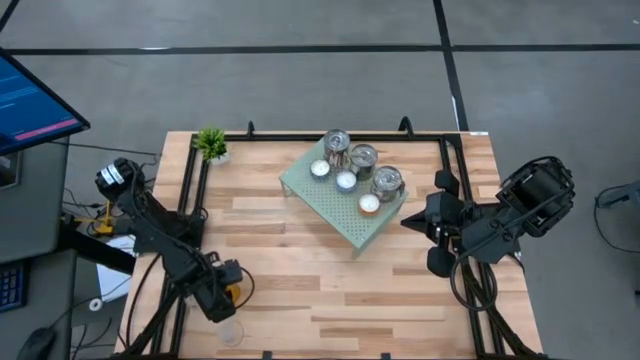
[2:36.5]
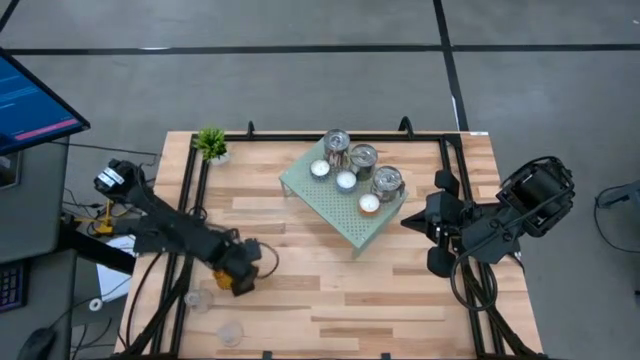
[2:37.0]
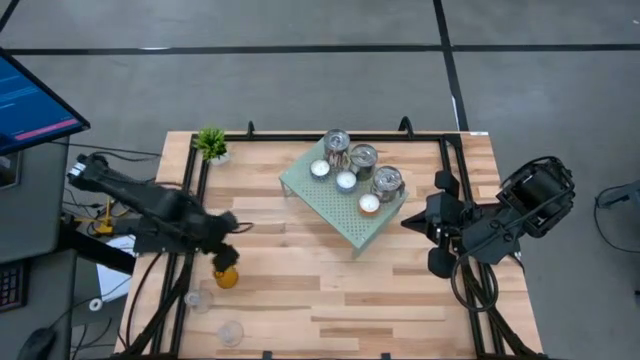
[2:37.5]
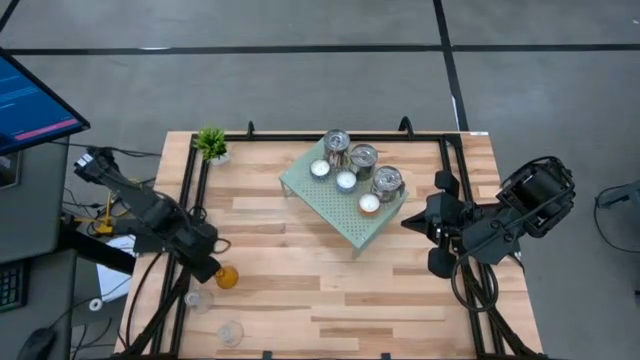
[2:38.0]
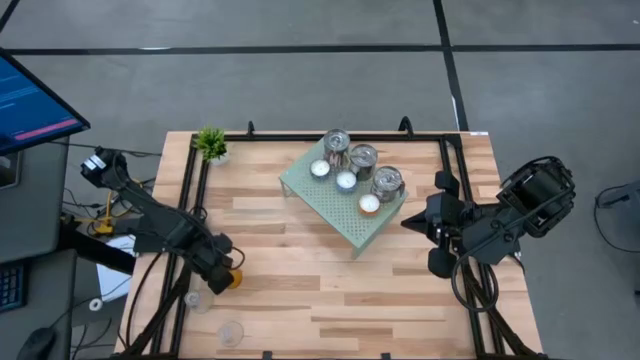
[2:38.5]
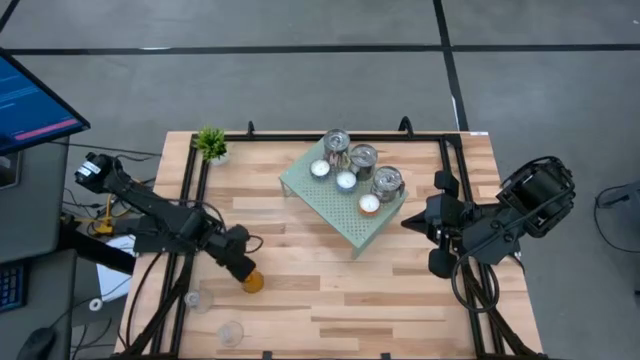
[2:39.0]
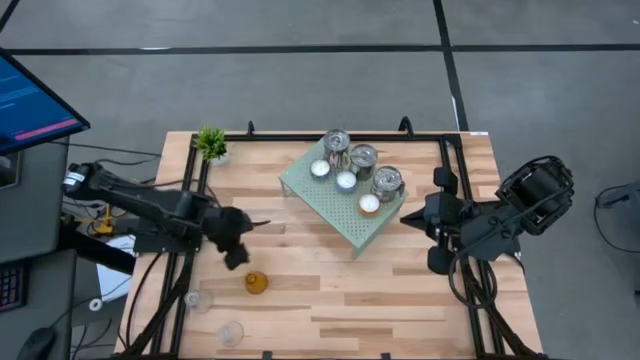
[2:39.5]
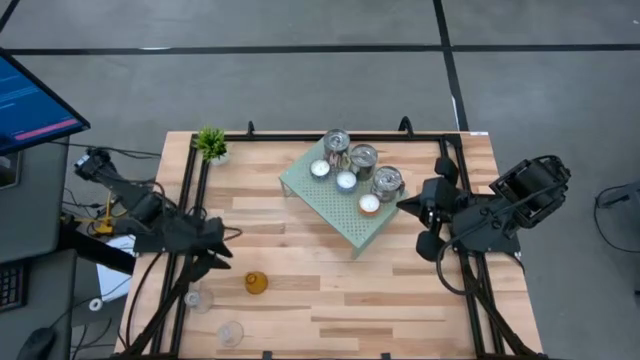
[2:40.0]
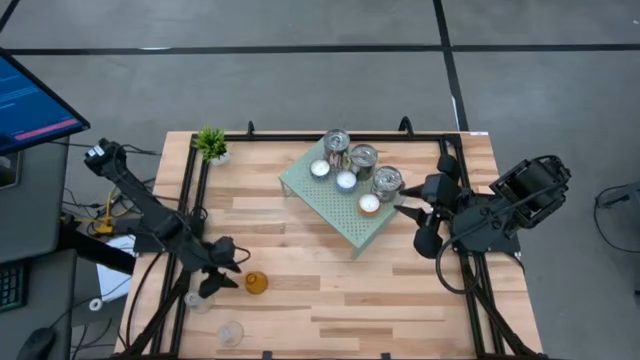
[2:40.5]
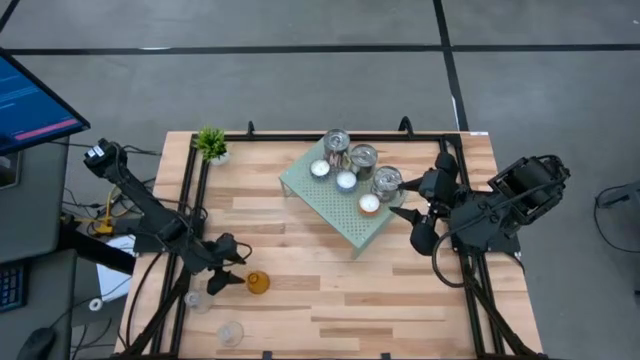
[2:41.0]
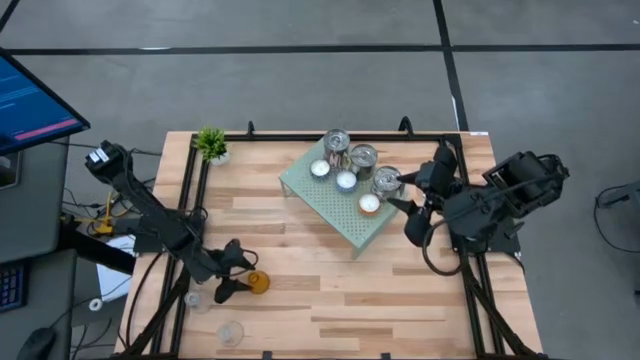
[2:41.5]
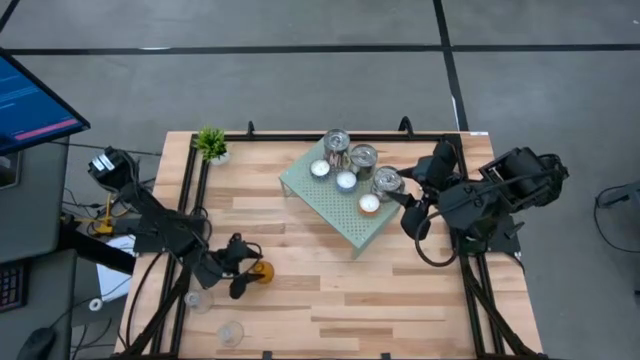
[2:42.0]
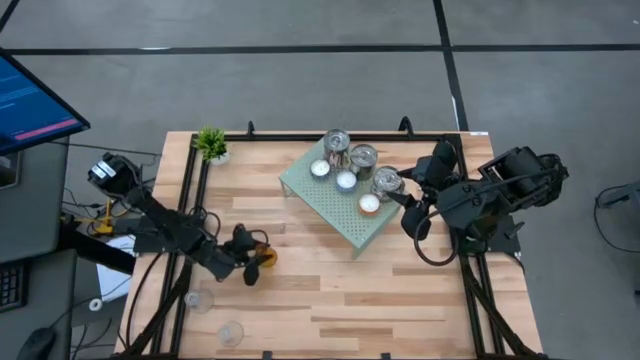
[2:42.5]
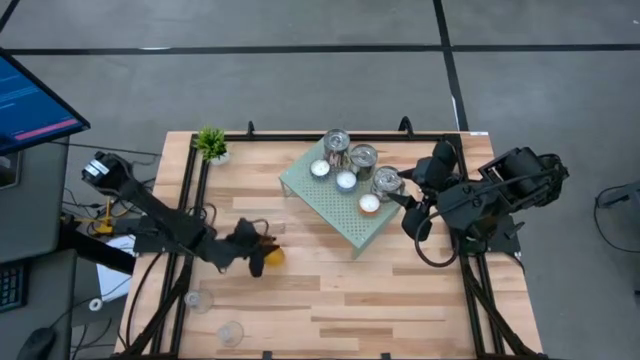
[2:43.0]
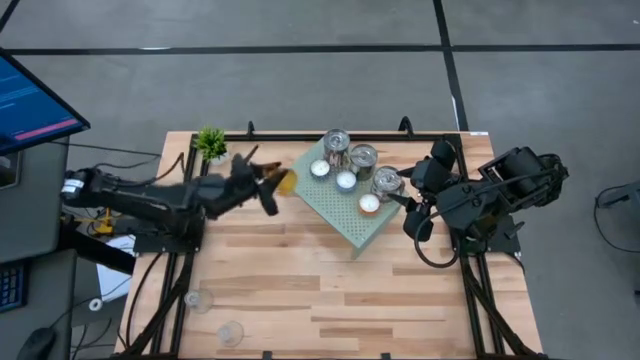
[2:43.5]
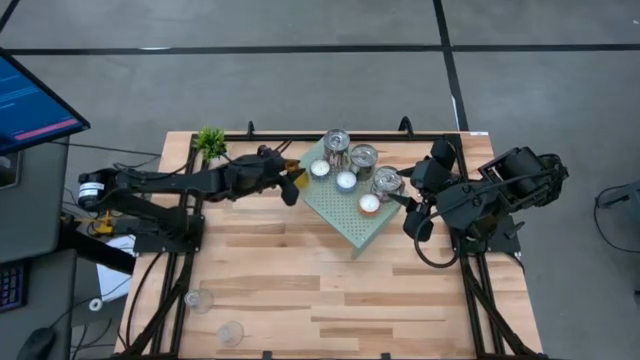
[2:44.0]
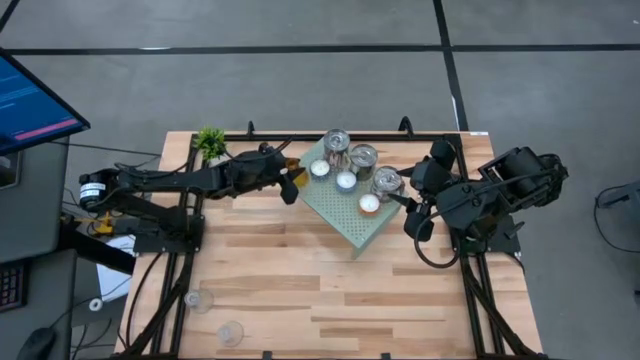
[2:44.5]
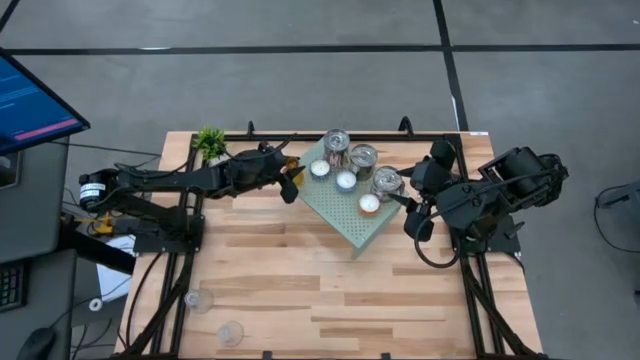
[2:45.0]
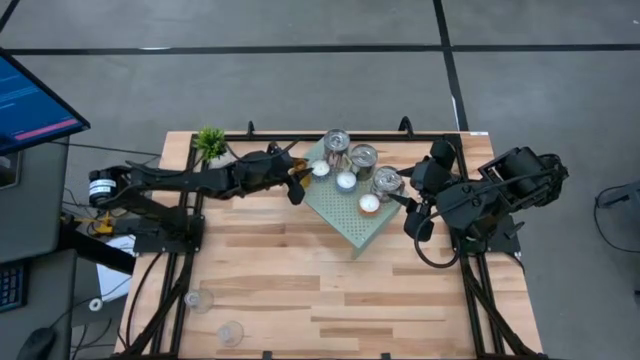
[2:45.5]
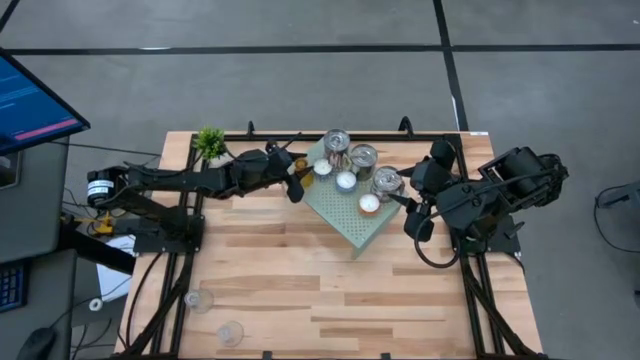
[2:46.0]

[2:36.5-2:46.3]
Task: Stock candles on shelf
Put the center orange candle holder on the shelf

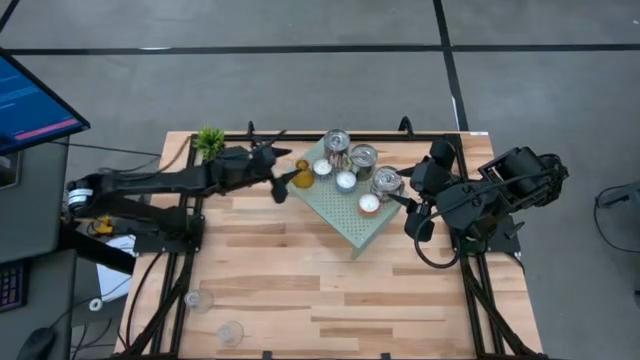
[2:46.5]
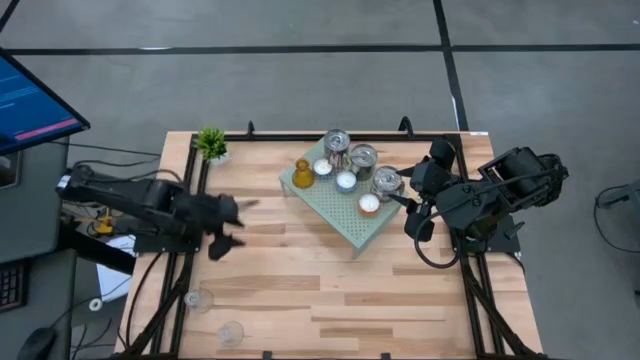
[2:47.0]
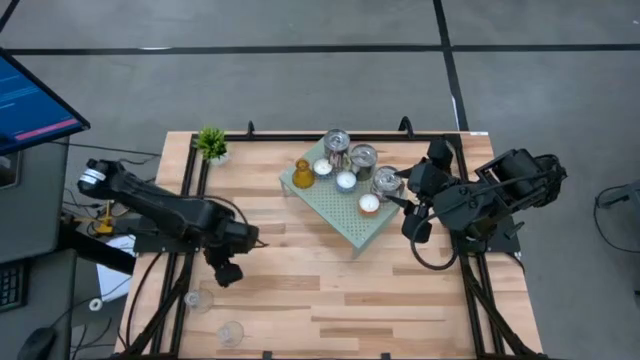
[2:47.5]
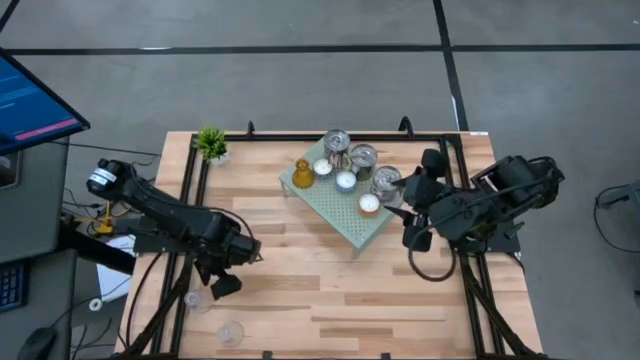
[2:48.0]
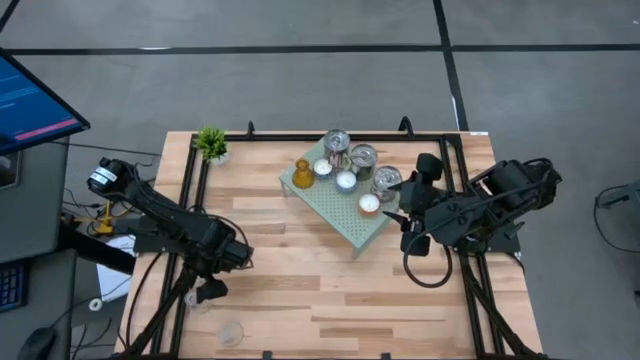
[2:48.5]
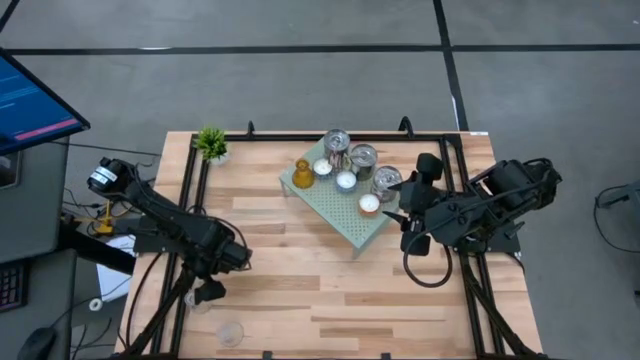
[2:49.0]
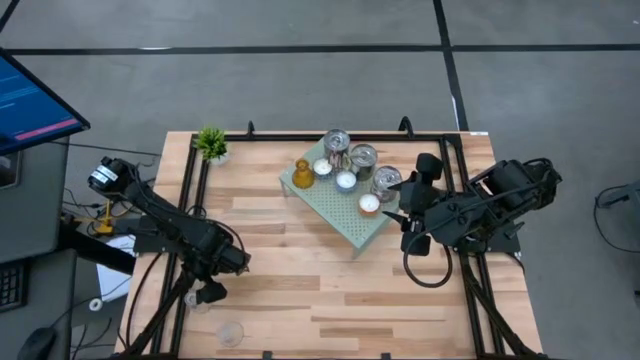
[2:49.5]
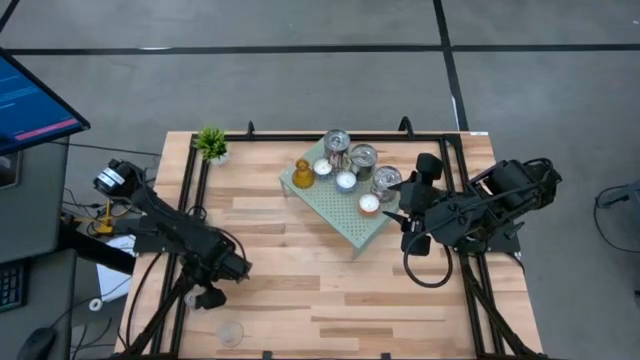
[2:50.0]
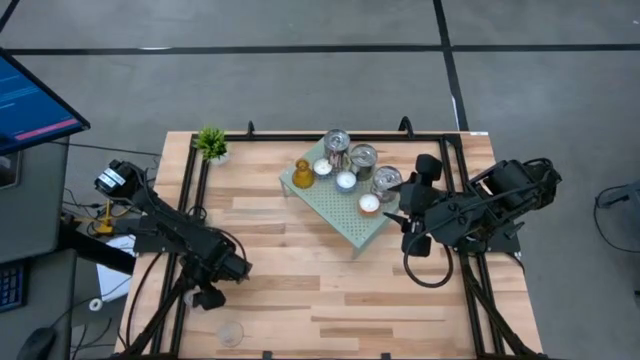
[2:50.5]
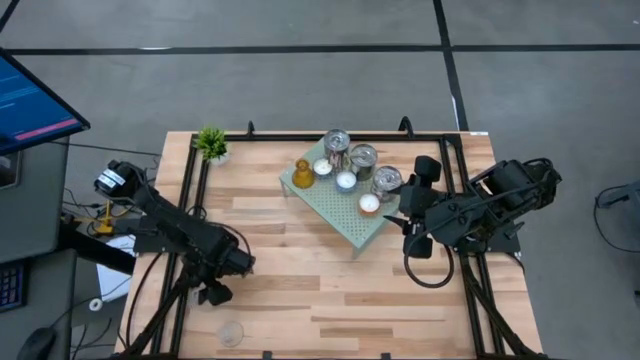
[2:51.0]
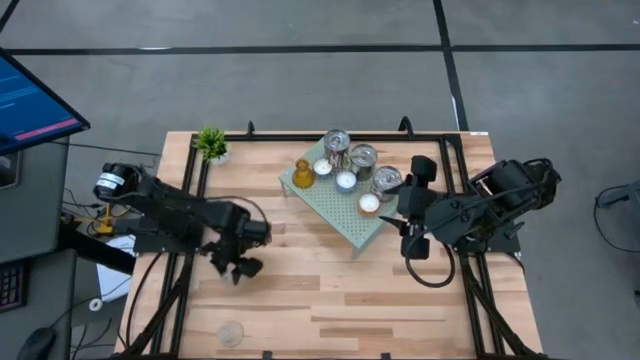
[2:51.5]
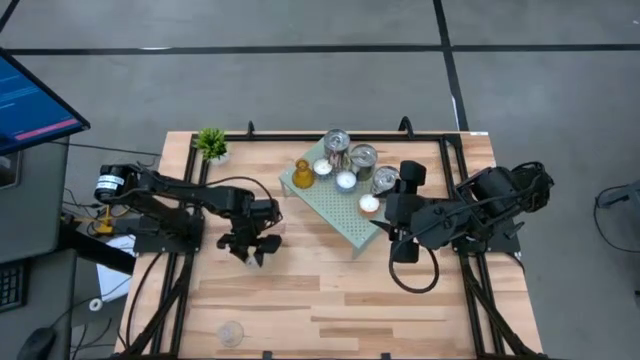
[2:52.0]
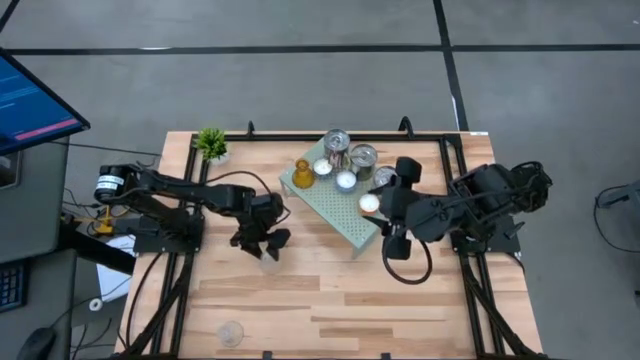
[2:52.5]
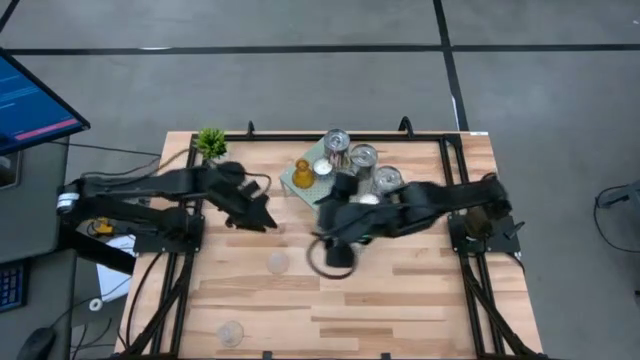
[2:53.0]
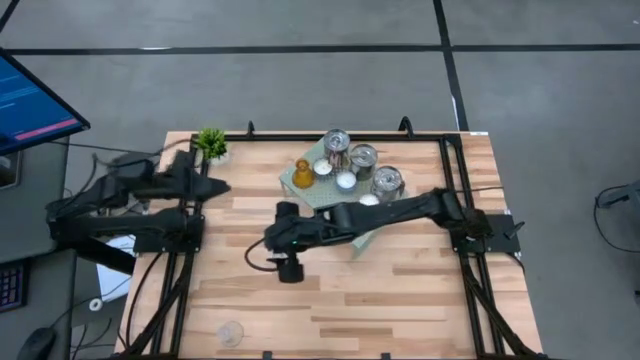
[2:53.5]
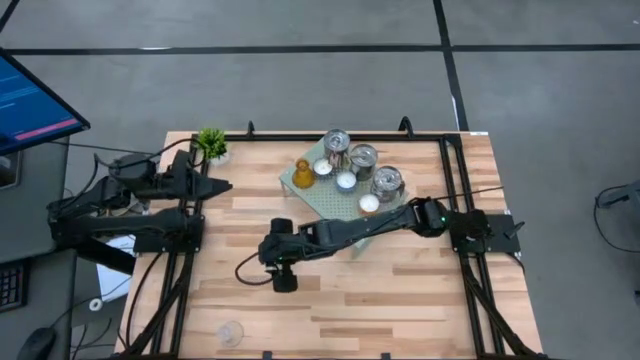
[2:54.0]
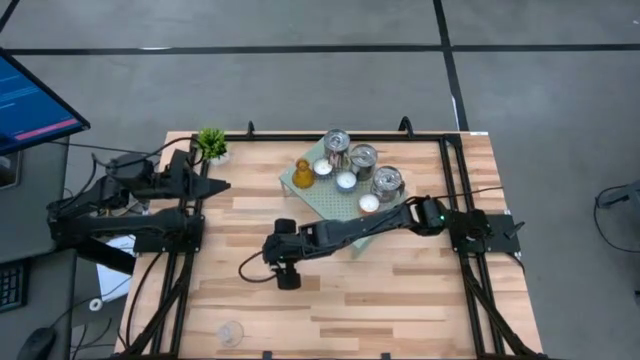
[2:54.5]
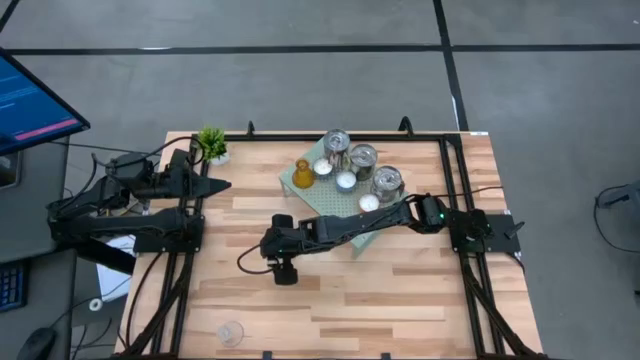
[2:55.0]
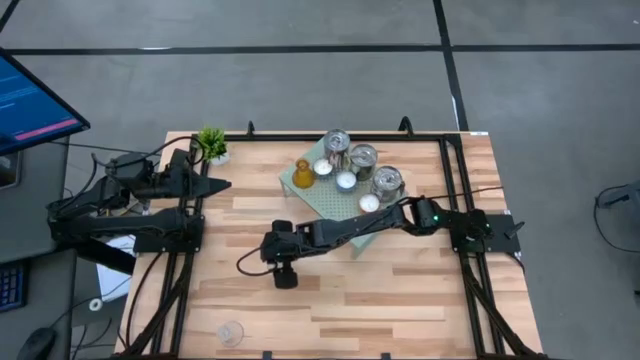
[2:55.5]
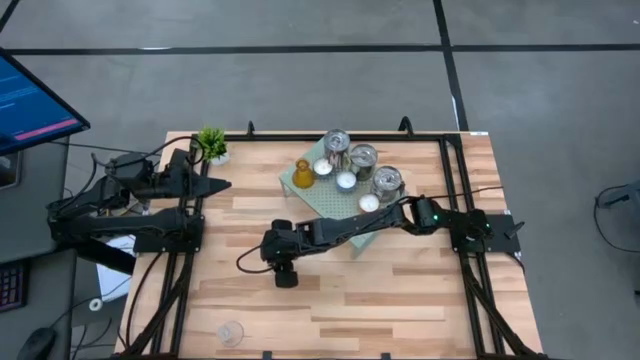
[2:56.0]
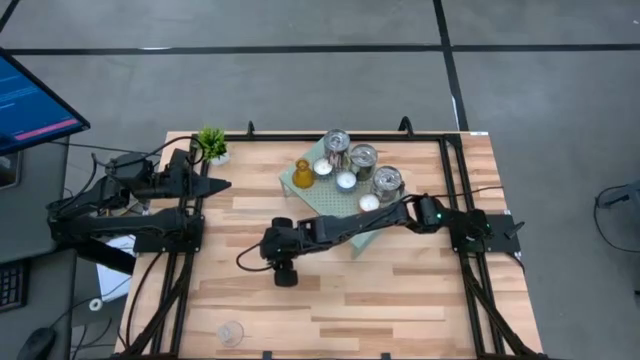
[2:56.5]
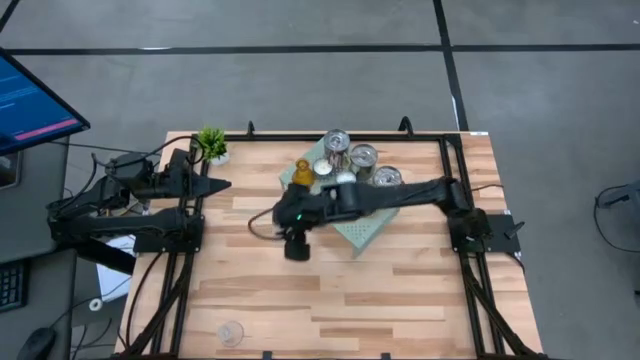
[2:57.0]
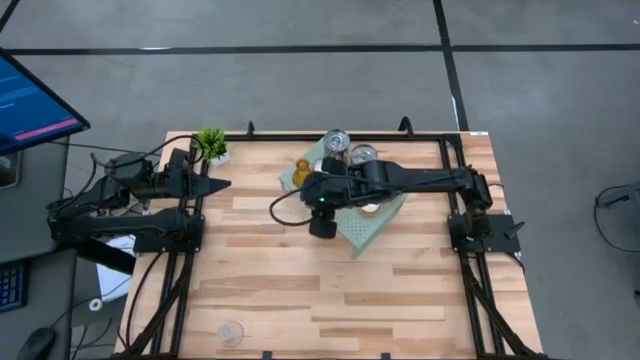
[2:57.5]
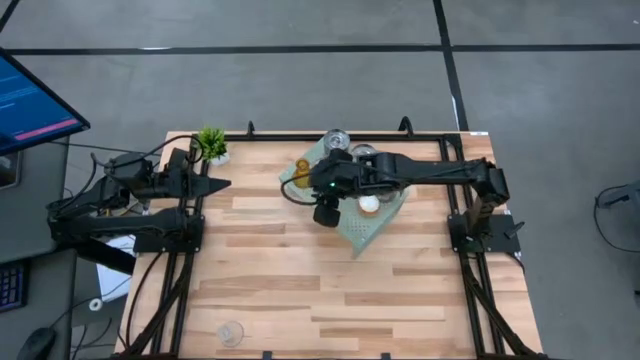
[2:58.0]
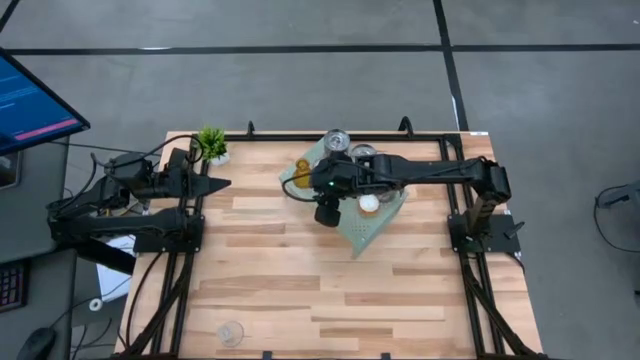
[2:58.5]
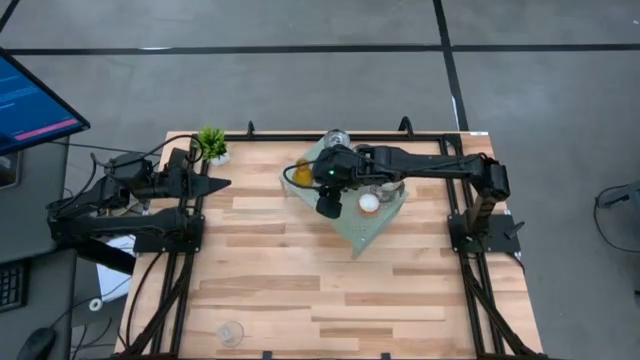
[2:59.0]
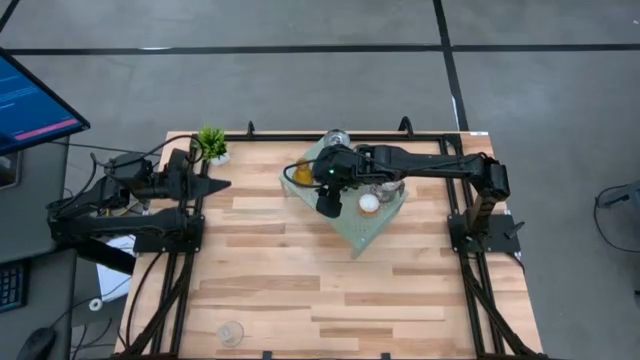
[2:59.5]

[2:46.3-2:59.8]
Put the top transparent candle holder on the shelf
